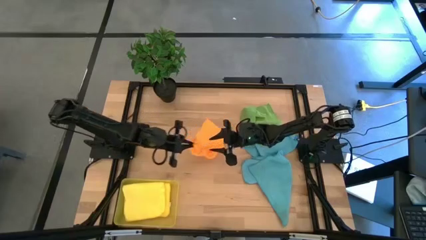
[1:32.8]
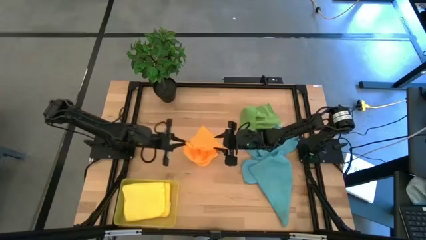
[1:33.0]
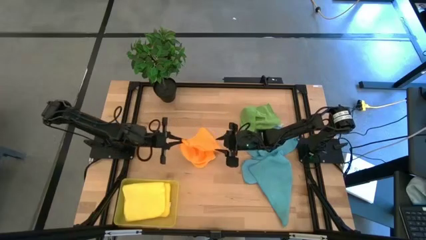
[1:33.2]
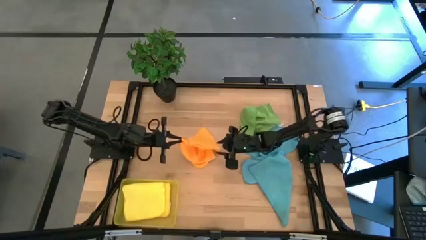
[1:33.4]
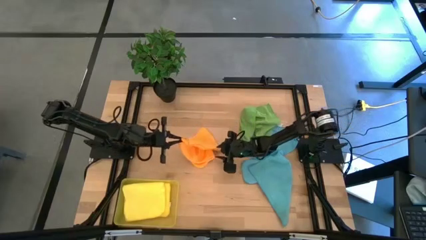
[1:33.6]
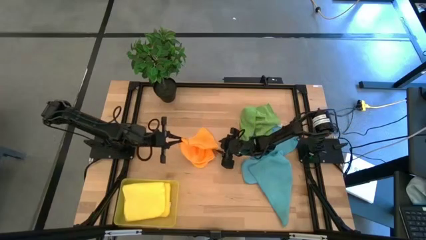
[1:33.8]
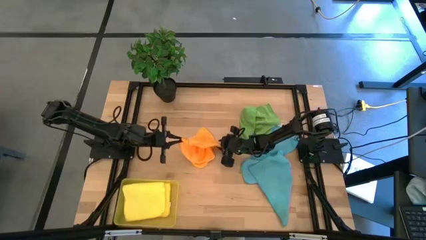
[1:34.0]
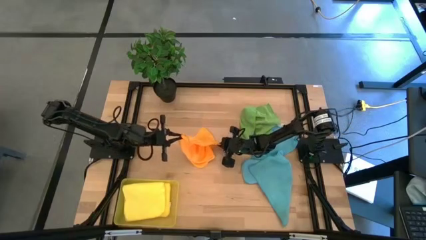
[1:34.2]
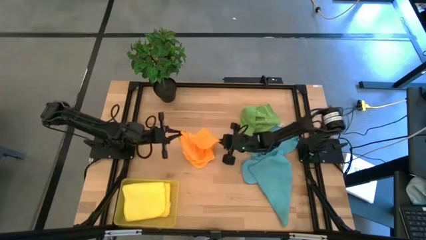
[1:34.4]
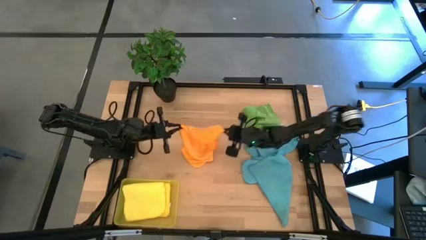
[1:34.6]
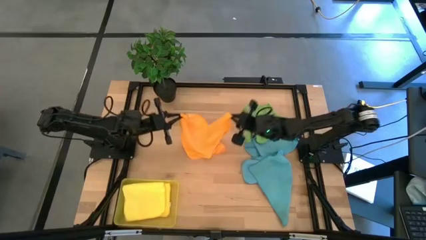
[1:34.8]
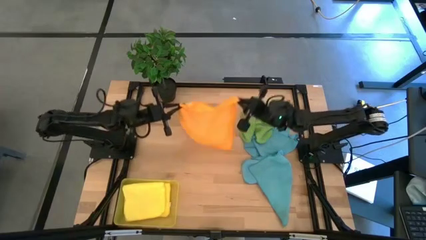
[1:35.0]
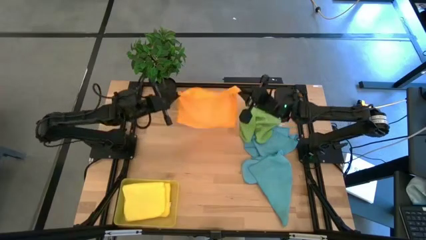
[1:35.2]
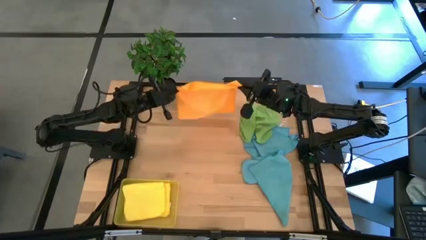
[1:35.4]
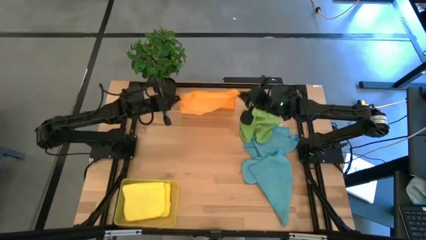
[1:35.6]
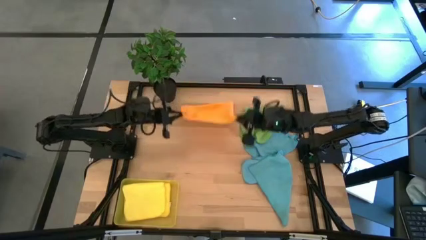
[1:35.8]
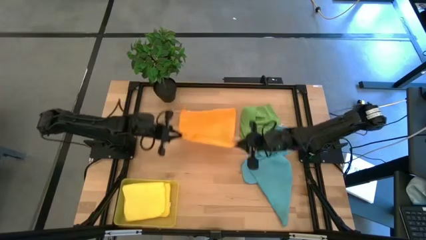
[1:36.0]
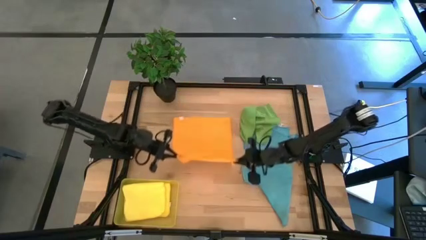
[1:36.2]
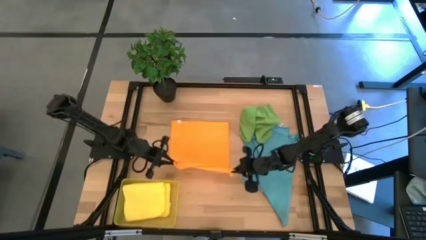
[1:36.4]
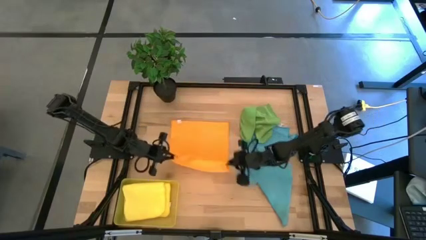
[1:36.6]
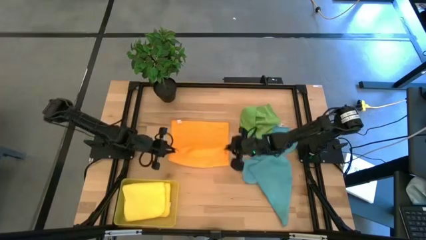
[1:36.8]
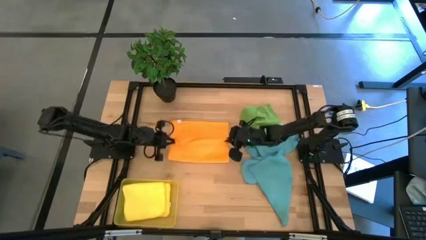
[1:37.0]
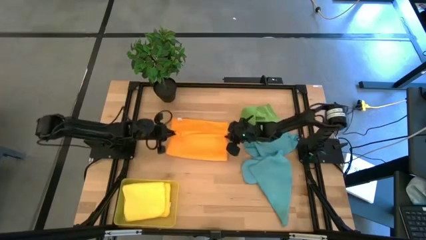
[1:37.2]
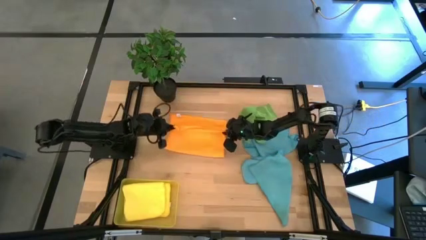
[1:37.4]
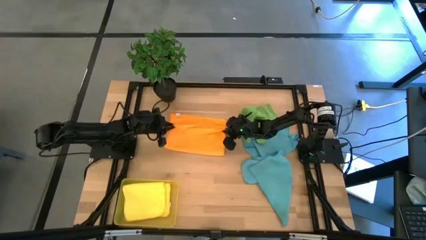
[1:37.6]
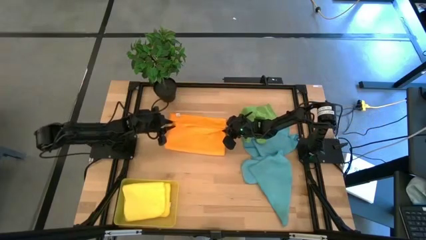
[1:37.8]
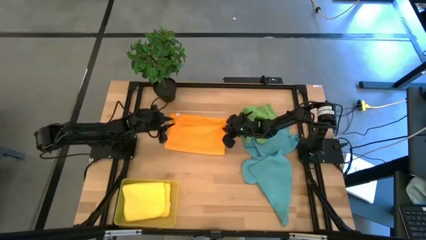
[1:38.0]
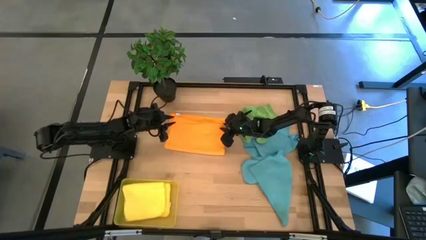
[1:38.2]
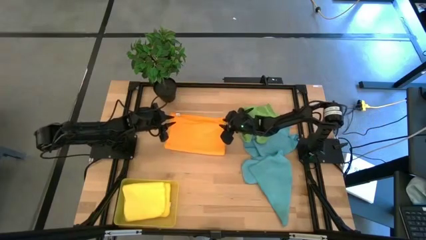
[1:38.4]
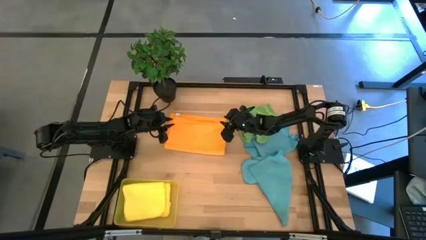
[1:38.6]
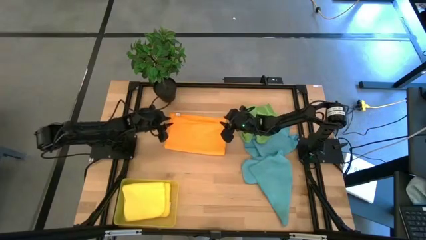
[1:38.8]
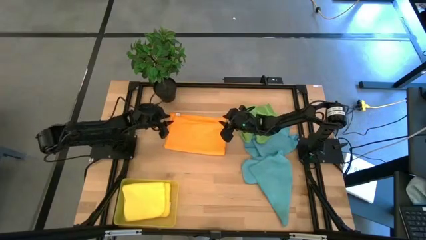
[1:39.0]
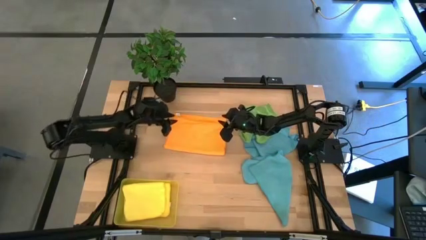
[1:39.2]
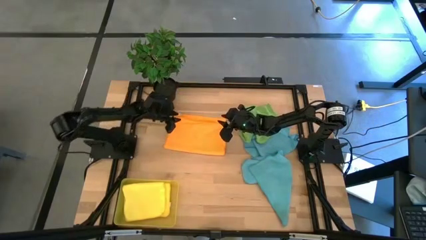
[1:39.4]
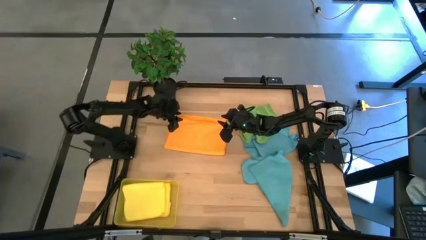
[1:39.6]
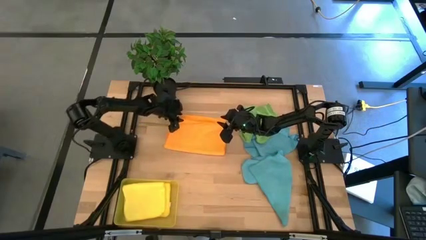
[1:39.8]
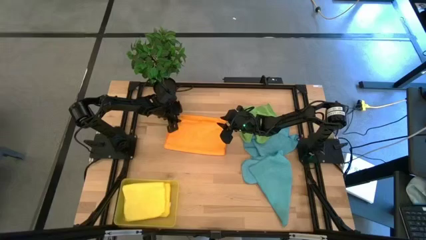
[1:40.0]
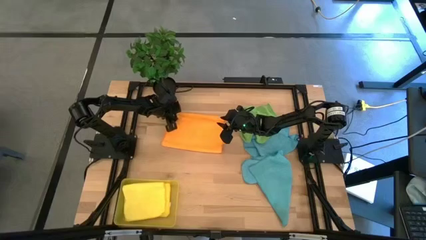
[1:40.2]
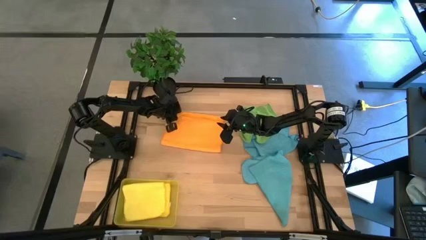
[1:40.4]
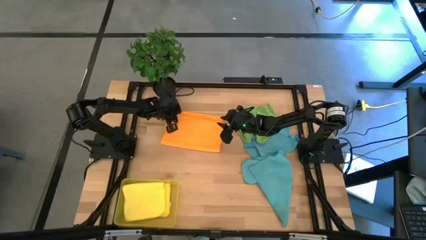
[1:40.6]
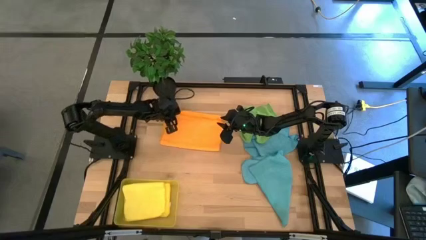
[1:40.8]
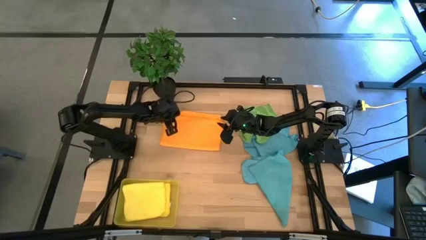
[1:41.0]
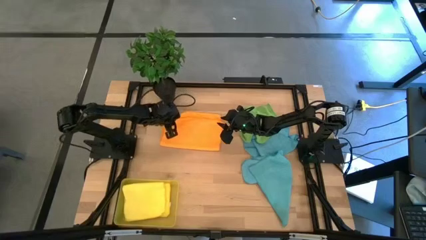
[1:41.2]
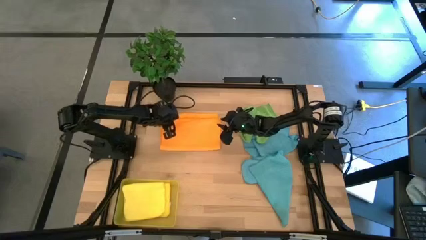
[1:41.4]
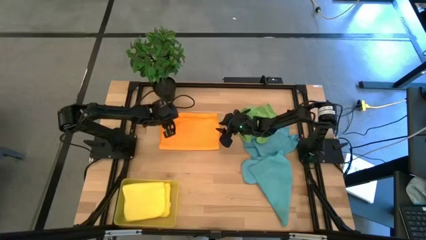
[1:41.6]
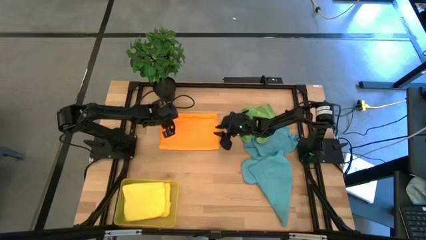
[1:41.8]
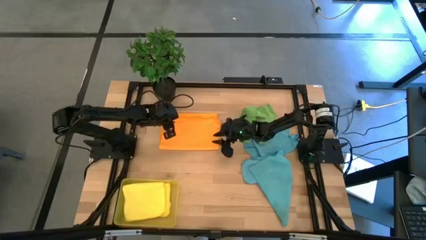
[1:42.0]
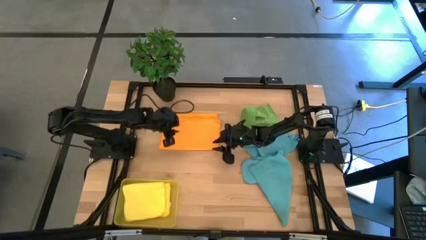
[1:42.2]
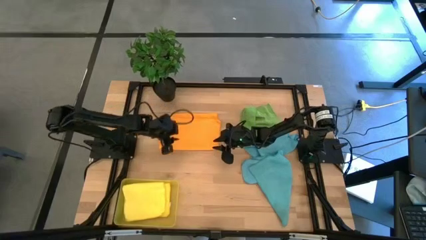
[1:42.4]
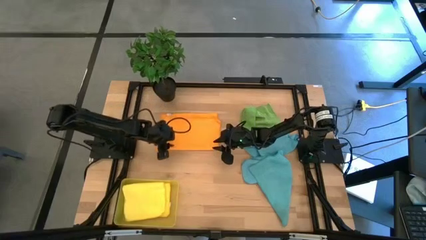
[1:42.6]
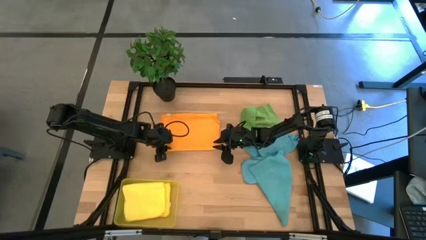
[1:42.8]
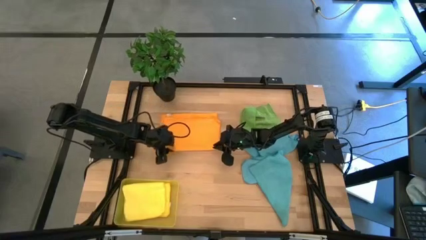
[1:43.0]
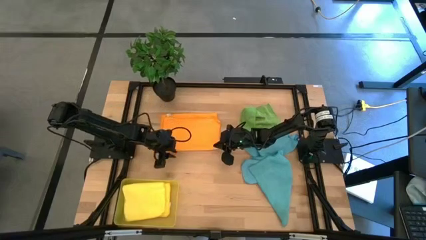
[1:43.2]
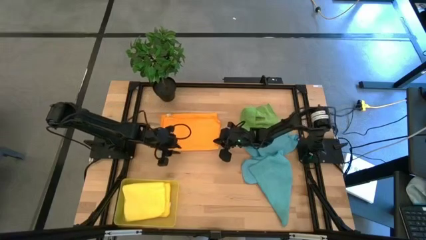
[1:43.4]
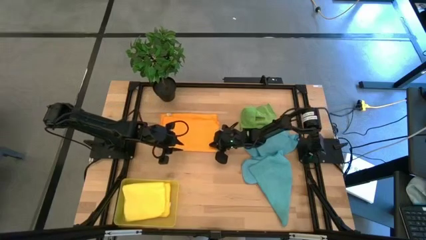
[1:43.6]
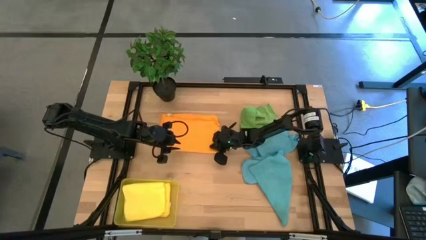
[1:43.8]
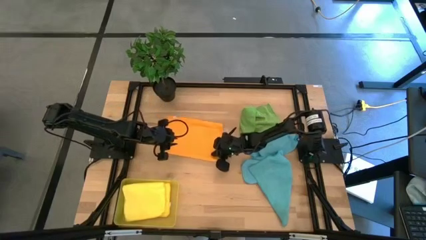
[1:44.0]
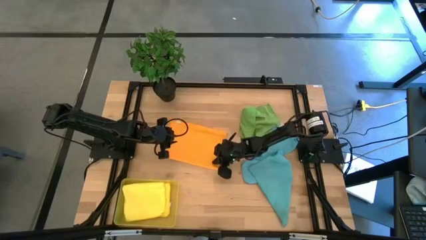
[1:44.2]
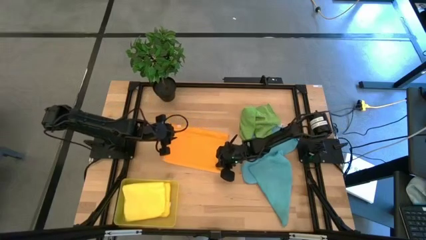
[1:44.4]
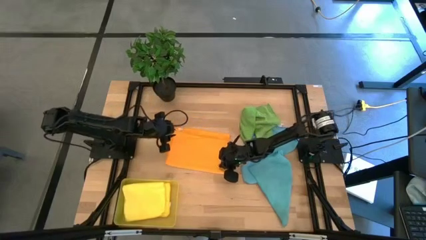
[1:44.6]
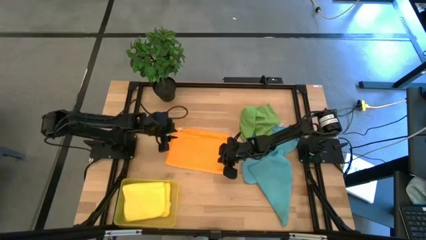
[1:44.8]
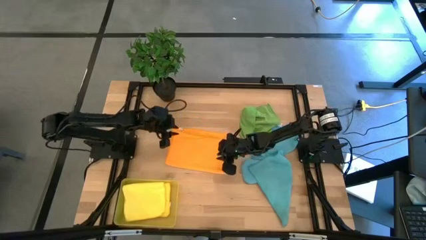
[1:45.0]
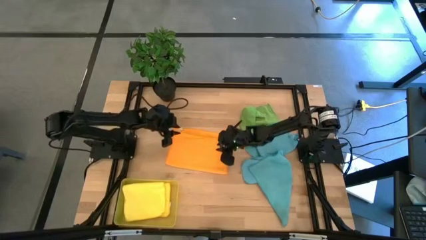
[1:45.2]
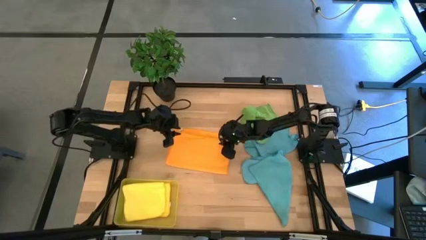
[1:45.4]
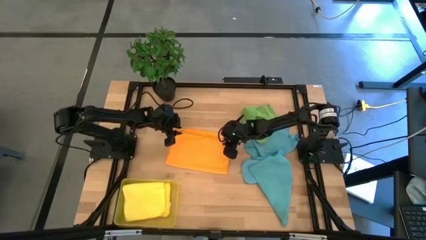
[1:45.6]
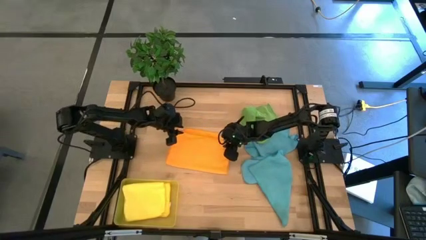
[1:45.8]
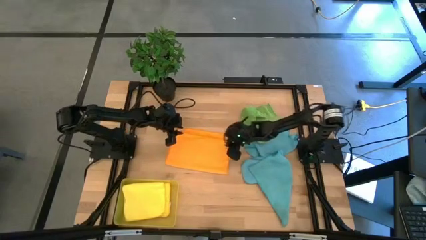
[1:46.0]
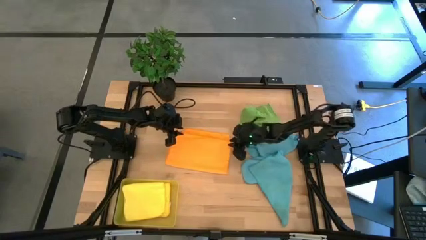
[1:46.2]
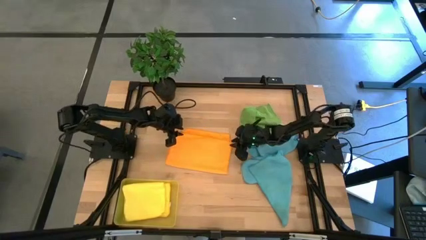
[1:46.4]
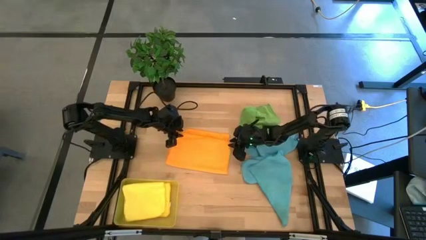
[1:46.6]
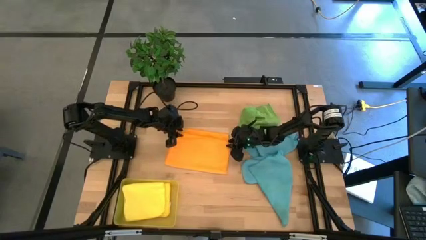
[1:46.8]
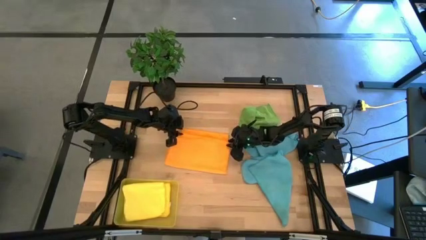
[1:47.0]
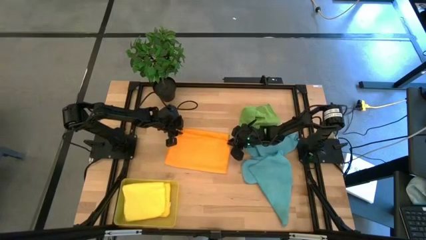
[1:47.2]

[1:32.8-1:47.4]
Task: Fold microfiber towels
Fold the orange microfiber cloth
